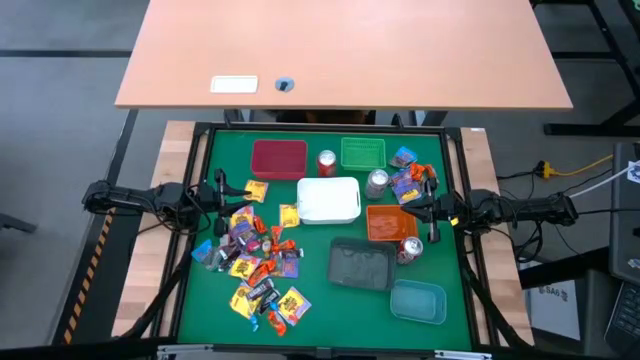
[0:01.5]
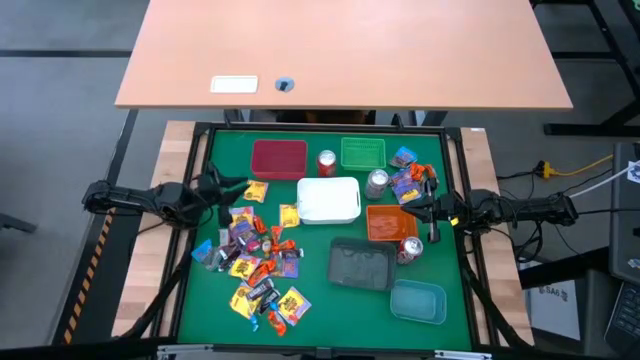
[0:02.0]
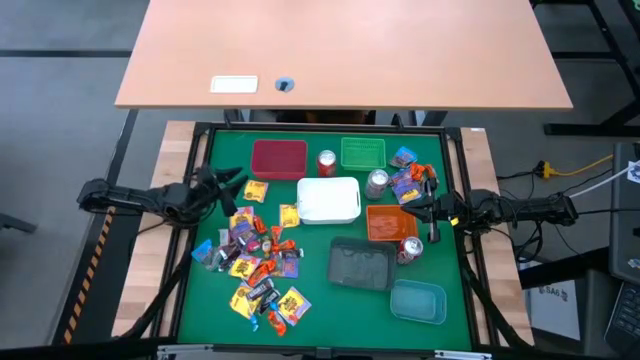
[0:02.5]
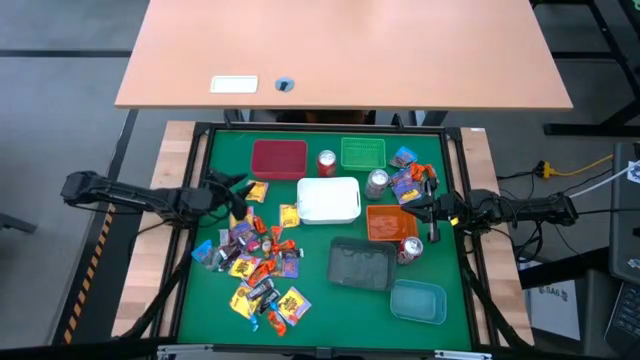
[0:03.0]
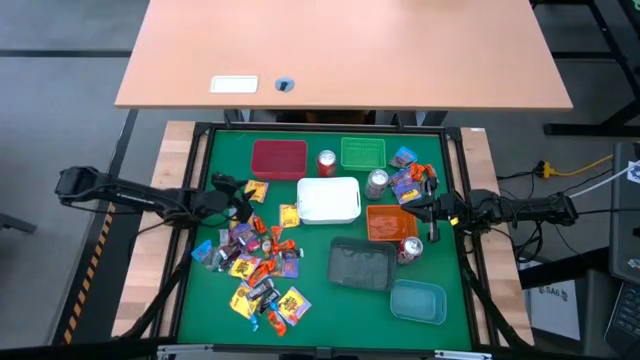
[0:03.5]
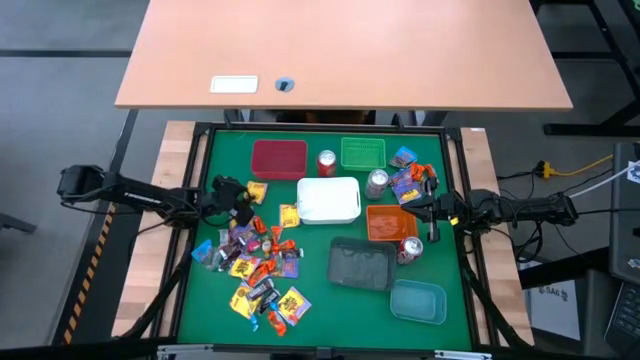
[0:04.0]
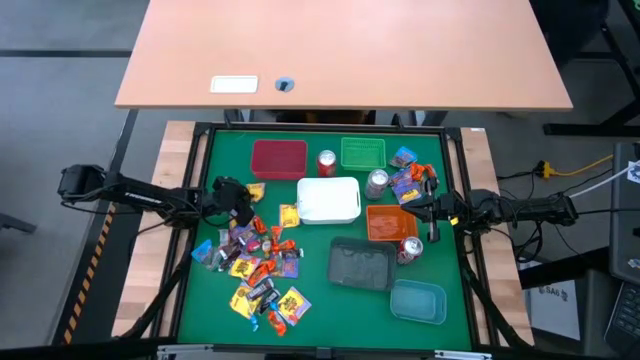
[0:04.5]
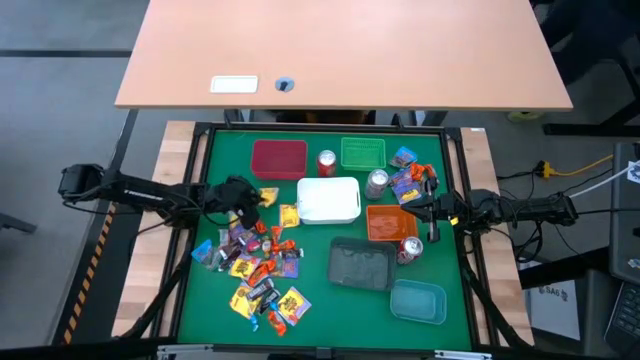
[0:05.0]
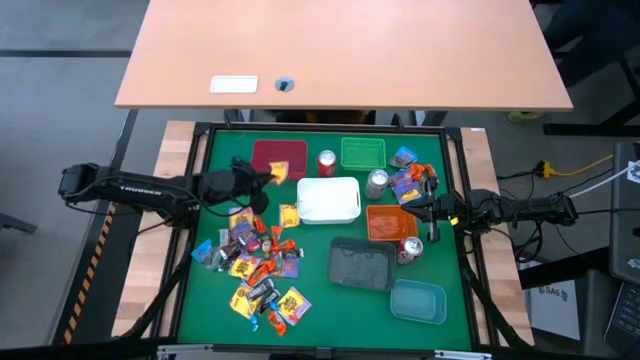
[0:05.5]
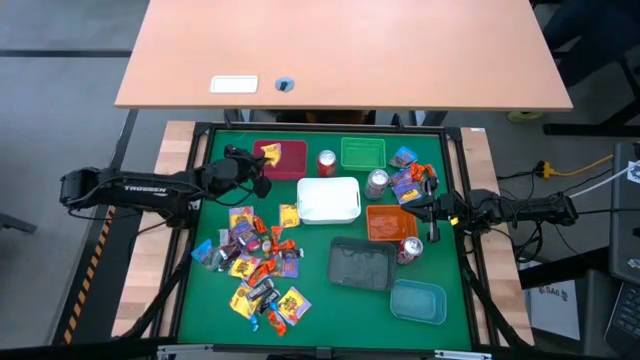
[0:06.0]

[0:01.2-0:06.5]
Task: Sort candy
Put yellow candy into the red bin

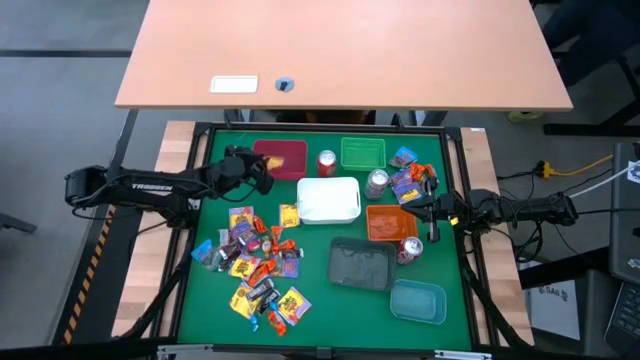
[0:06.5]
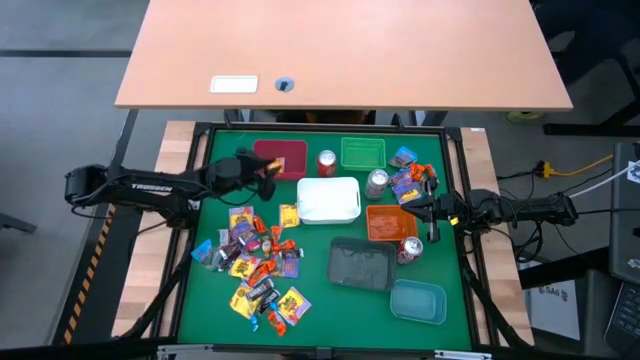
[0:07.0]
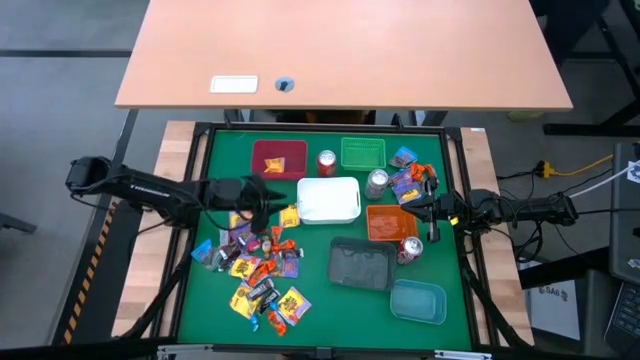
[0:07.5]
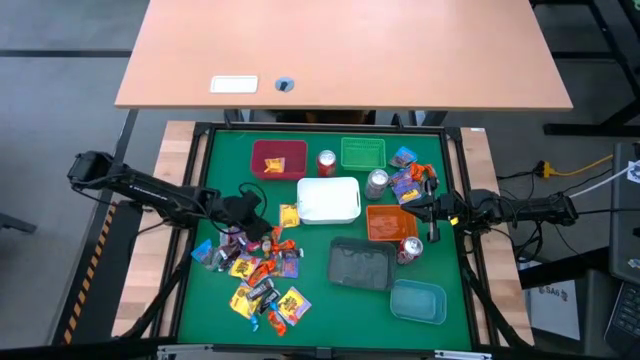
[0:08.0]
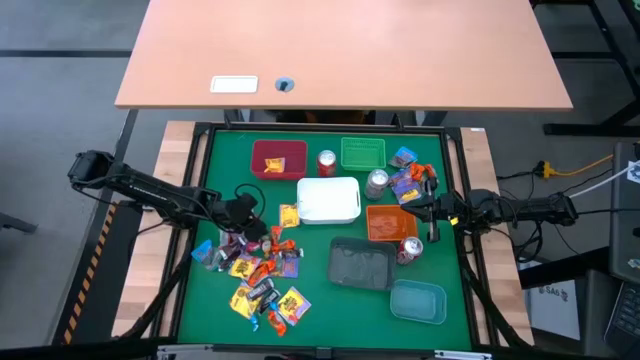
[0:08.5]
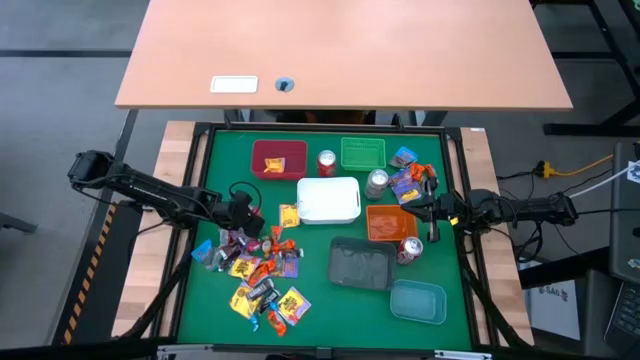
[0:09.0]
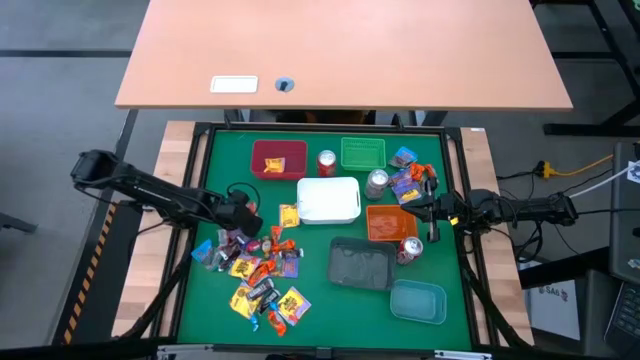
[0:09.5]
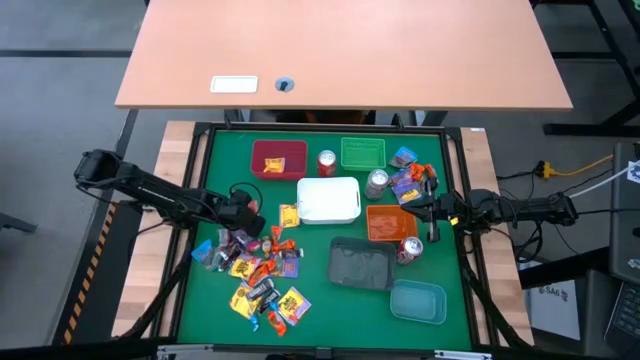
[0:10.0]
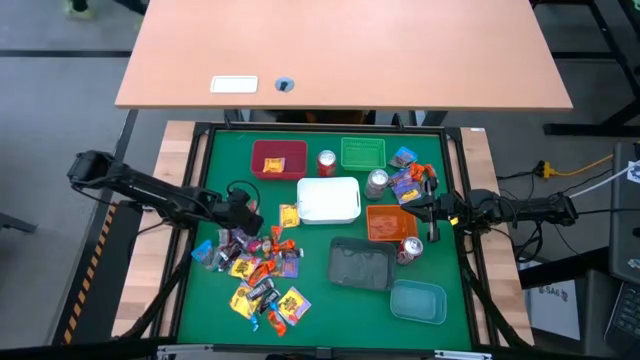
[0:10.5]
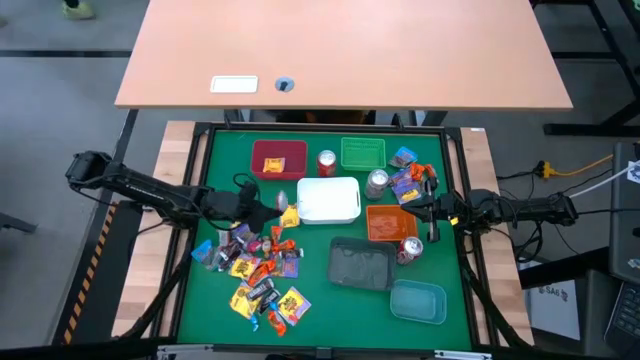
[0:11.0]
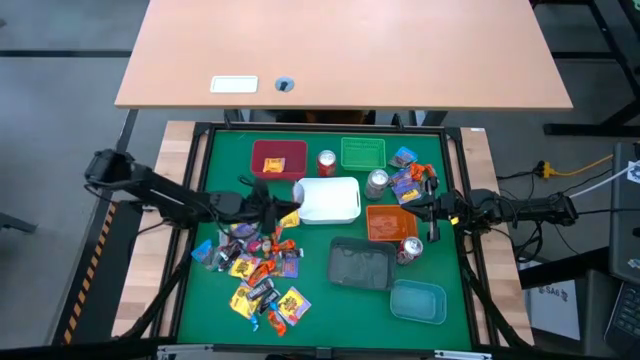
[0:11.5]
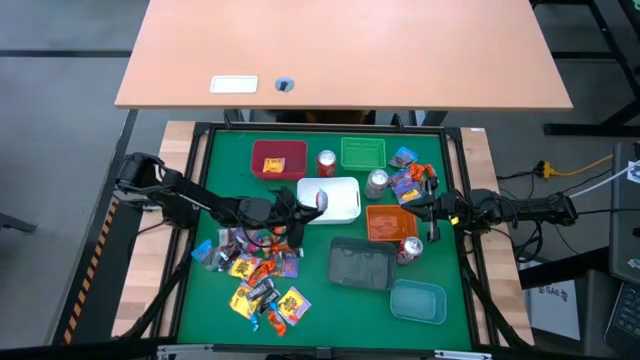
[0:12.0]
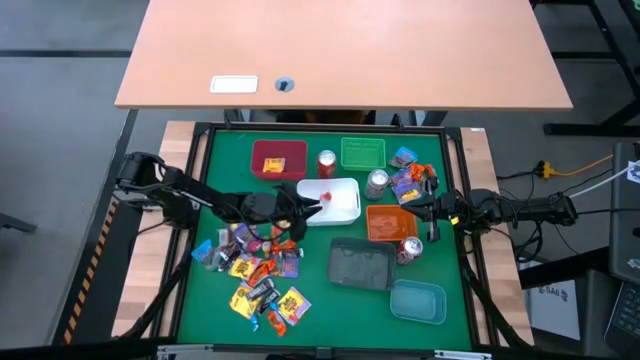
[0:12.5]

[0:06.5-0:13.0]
Put the orange candy into the white bin

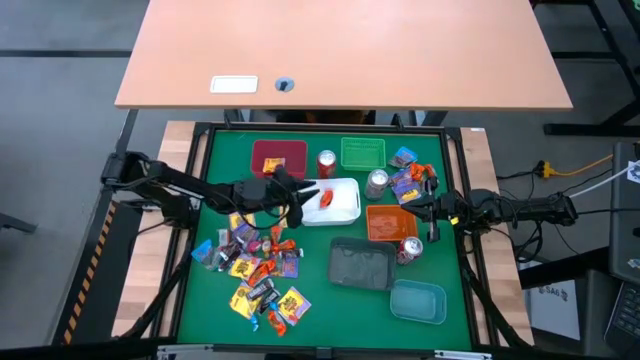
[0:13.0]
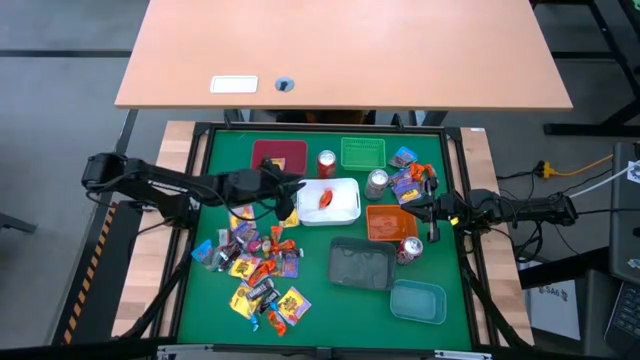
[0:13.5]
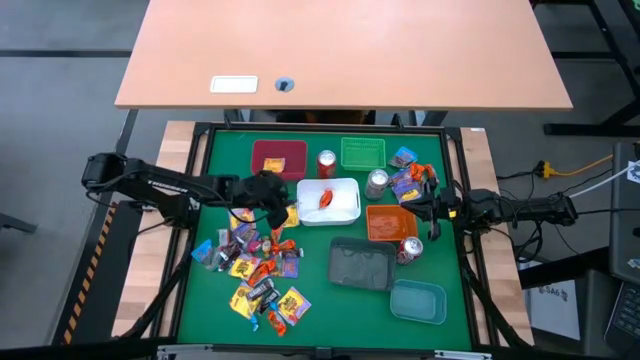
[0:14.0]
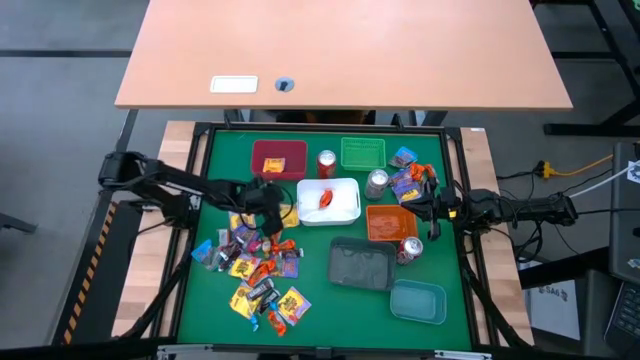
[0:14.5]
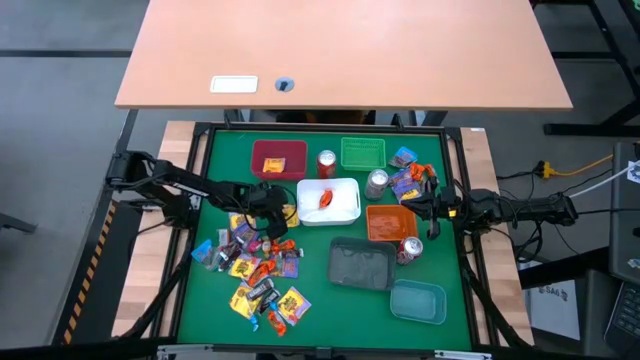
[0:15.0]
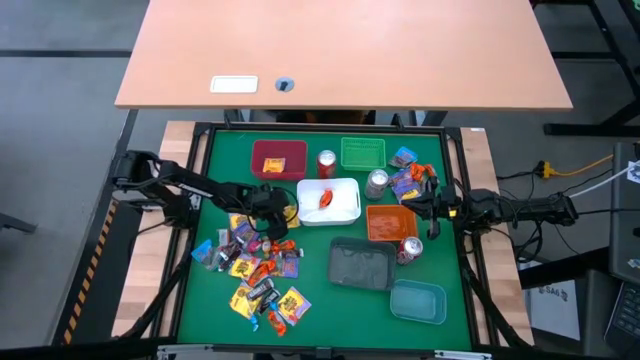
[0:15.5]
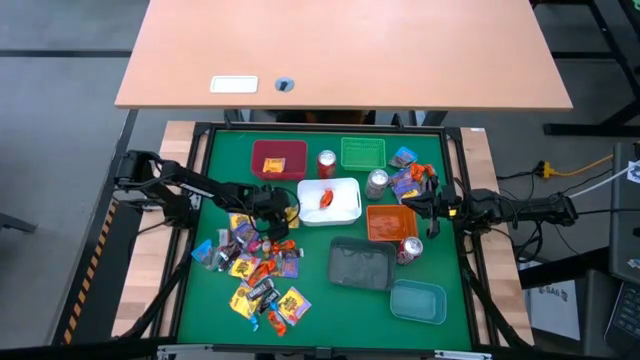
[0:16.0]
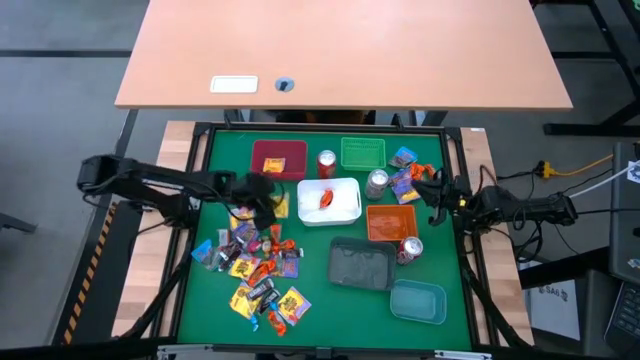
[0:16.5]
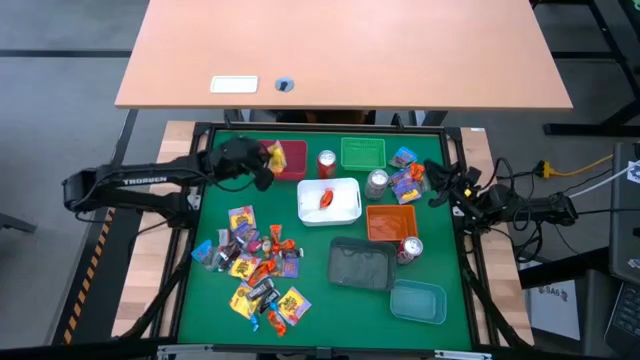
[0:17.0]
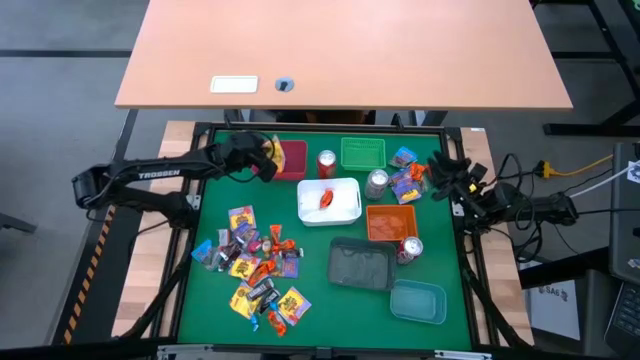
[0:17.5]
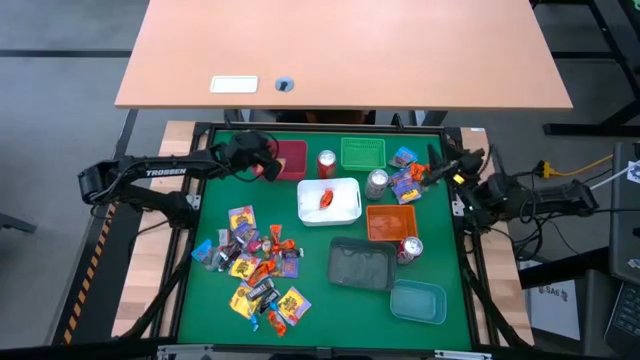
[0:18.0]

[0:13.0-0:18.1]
Put the yellow candy into the red bin

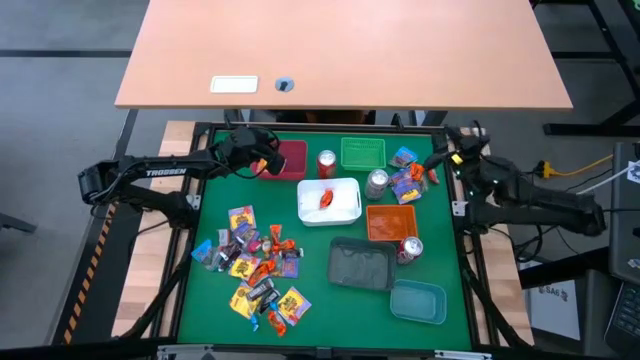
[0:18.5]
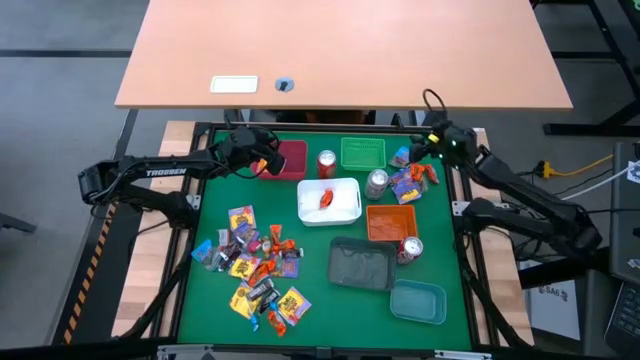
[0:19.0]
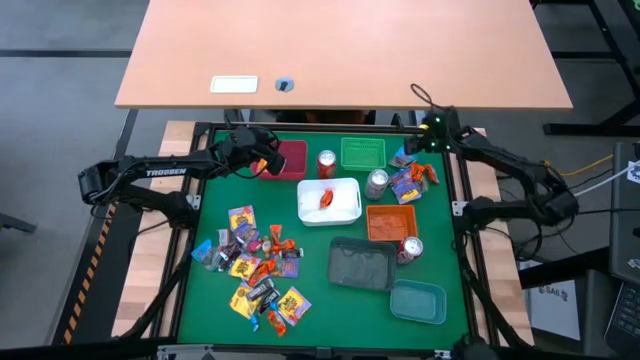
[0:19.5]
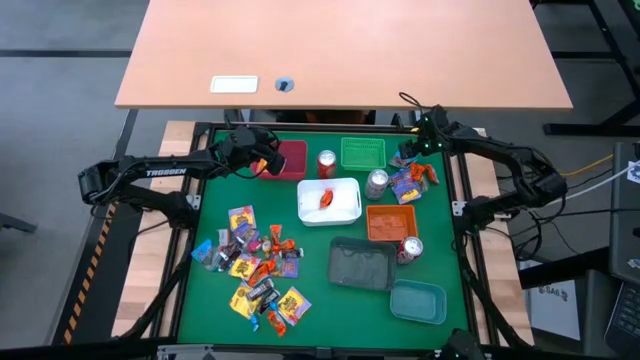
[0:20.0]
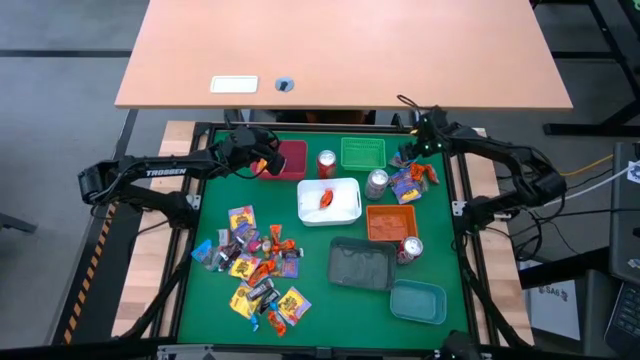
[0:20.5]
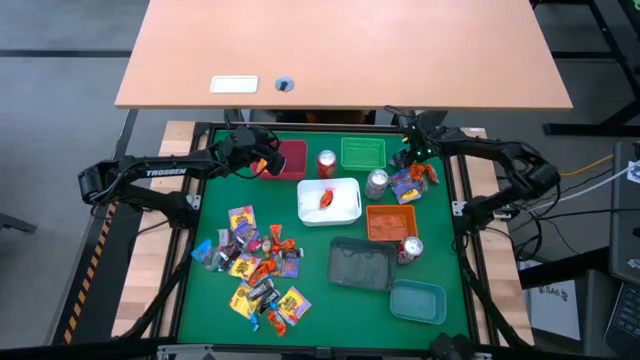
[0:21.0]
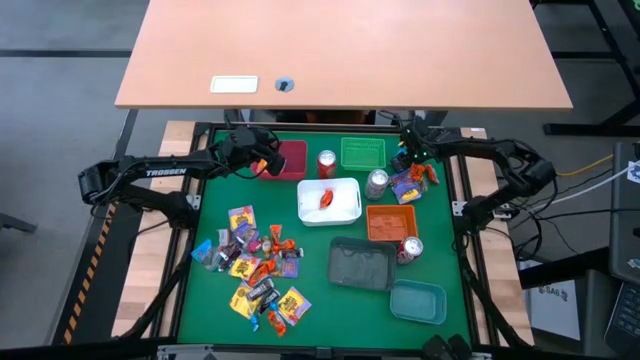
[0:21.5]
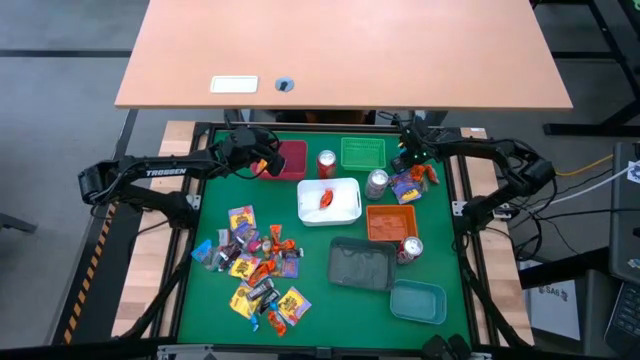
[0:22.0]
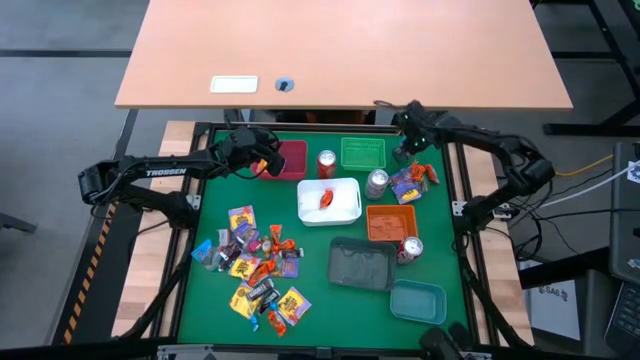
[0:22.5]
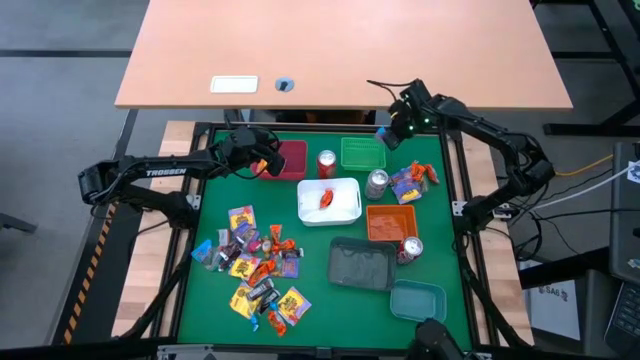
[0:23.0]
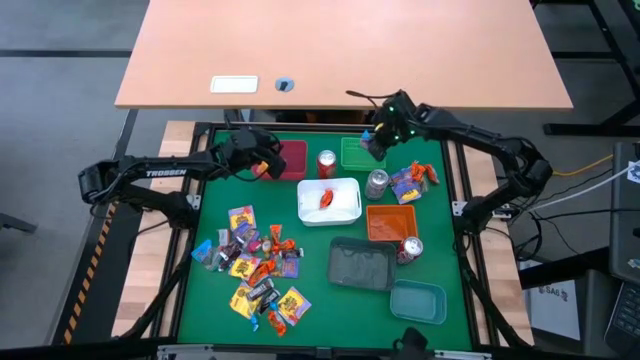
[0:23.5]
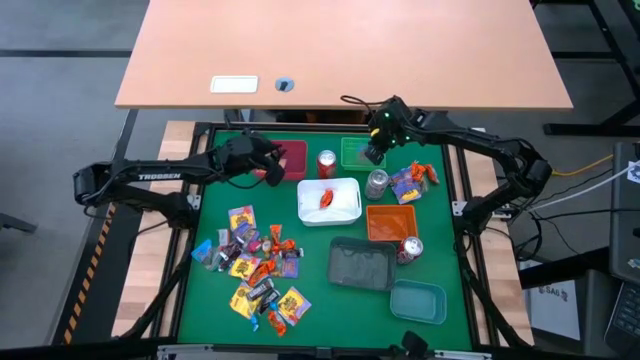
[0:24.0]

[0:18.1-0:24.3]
Put the blue candy into the green bin
